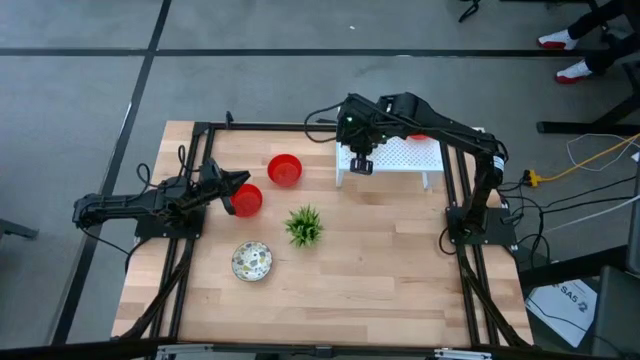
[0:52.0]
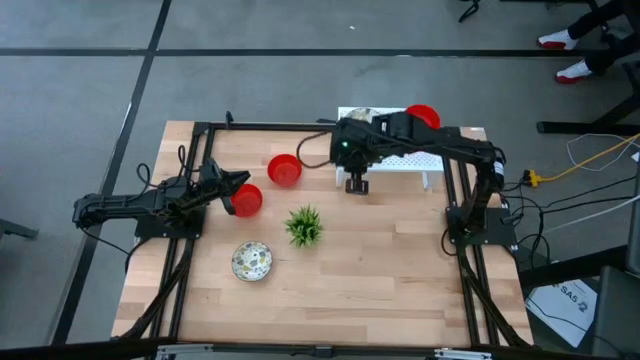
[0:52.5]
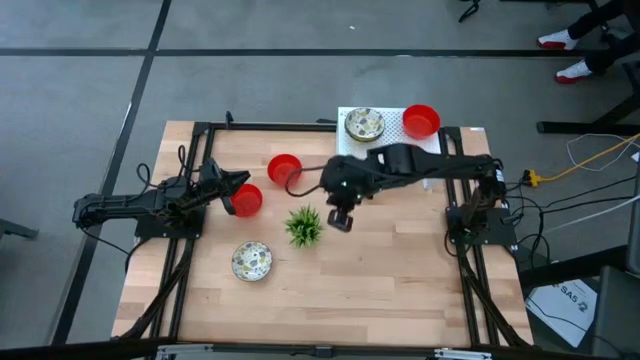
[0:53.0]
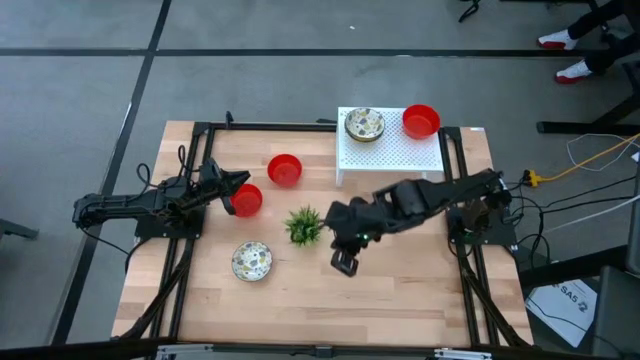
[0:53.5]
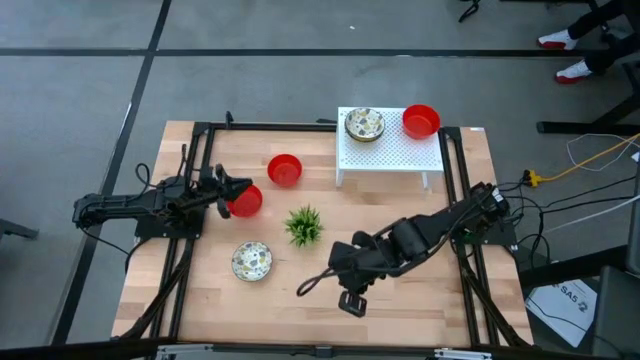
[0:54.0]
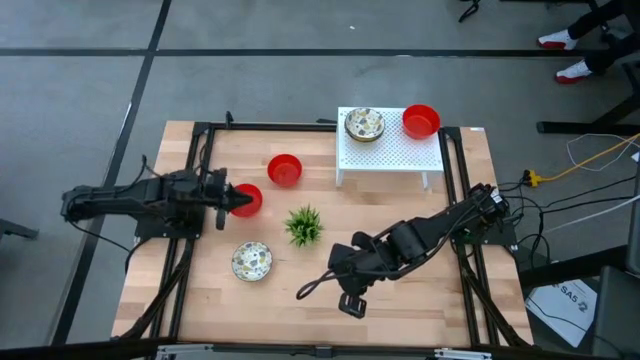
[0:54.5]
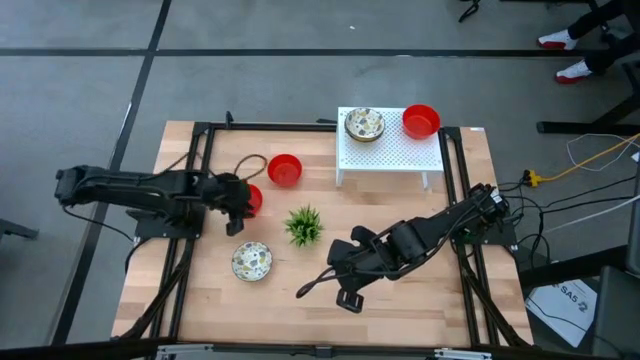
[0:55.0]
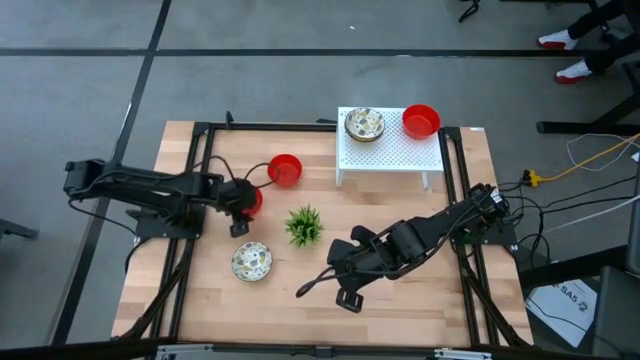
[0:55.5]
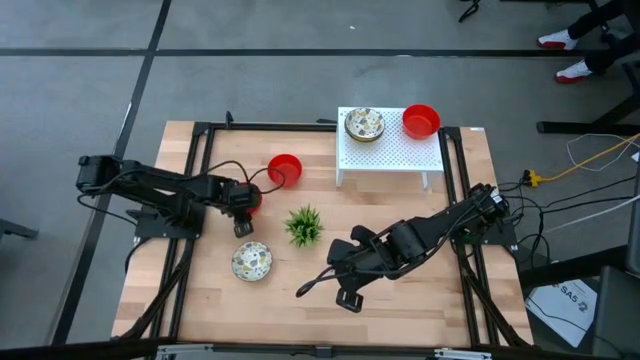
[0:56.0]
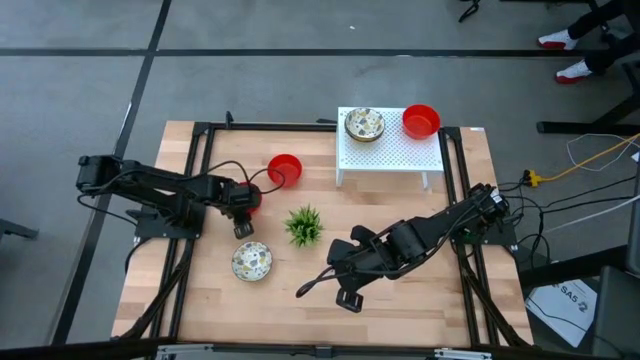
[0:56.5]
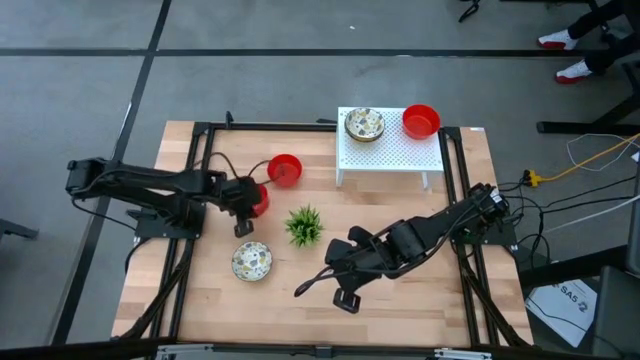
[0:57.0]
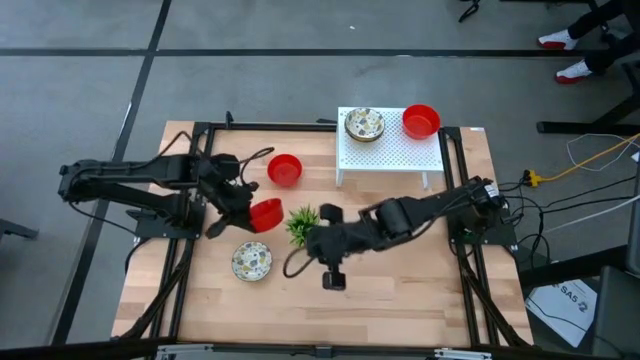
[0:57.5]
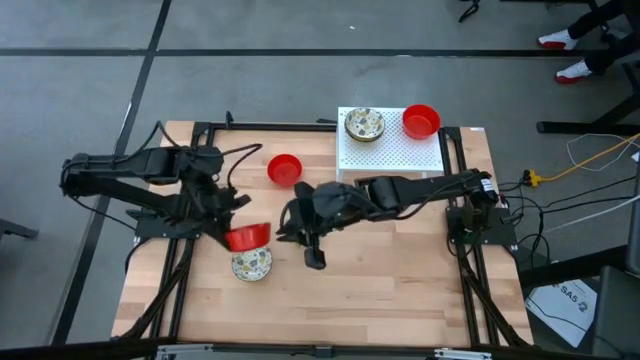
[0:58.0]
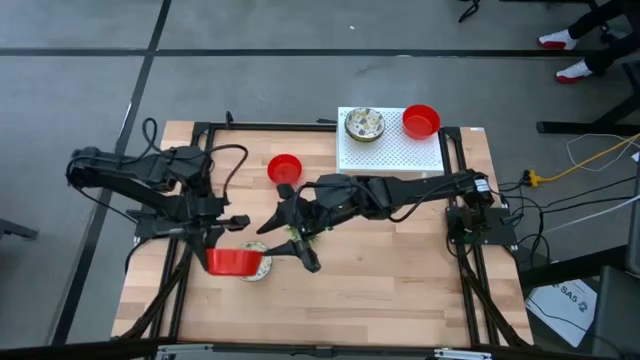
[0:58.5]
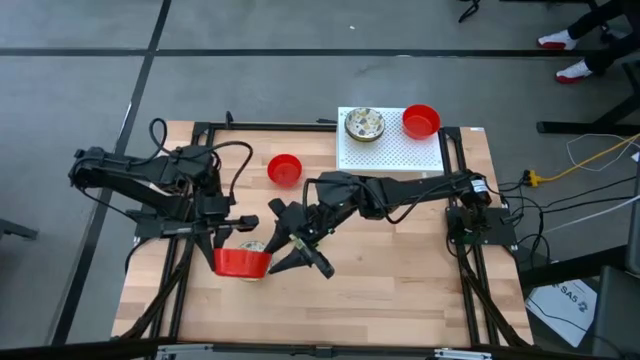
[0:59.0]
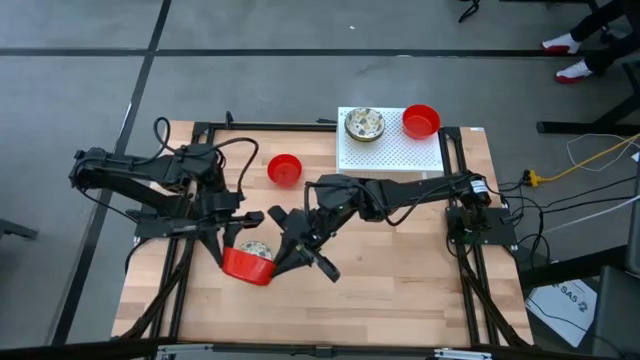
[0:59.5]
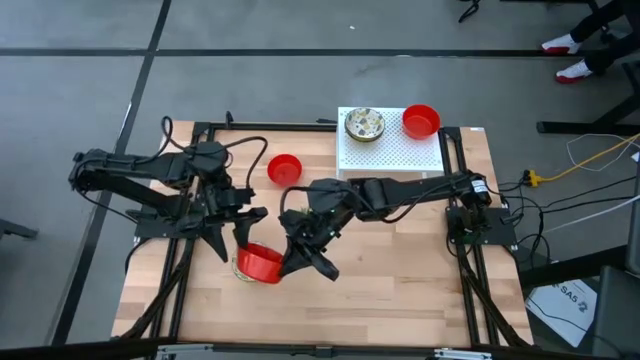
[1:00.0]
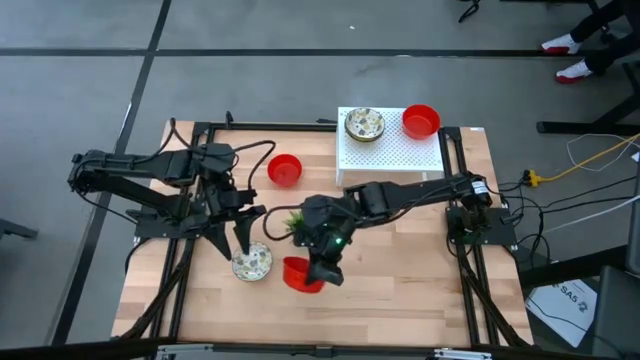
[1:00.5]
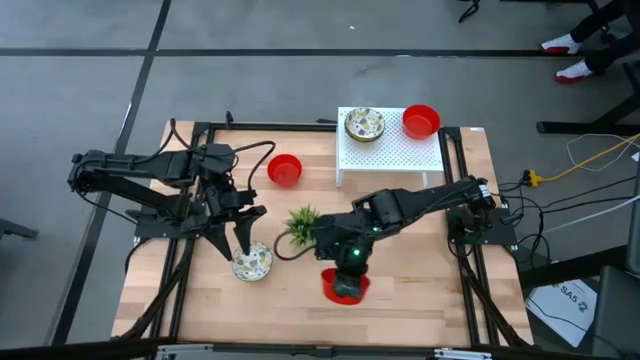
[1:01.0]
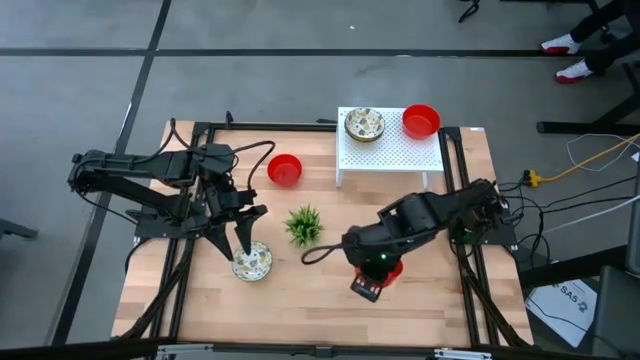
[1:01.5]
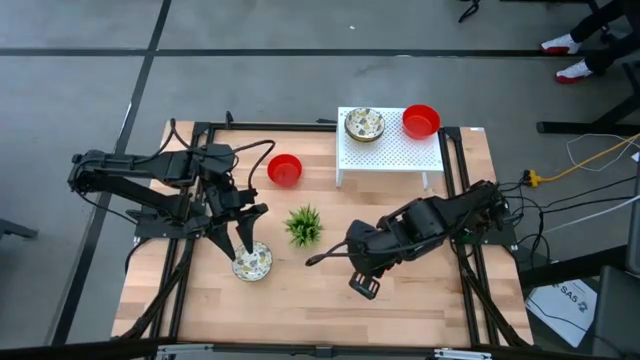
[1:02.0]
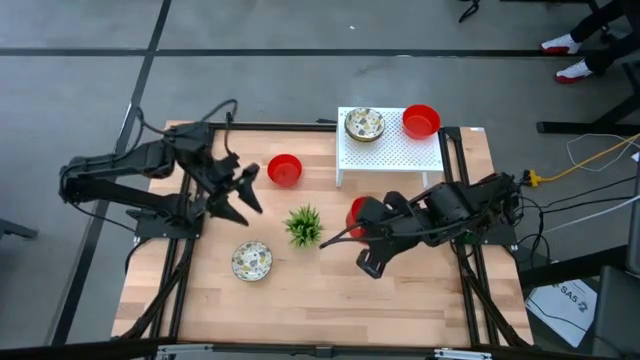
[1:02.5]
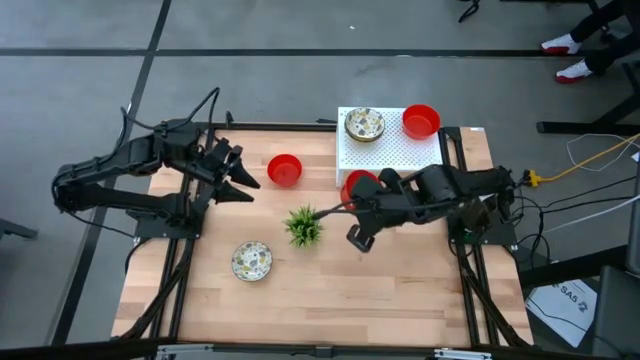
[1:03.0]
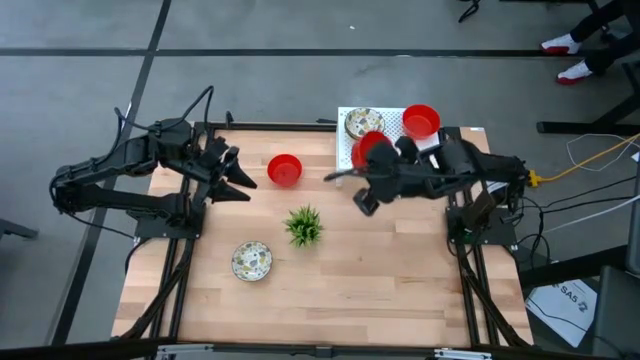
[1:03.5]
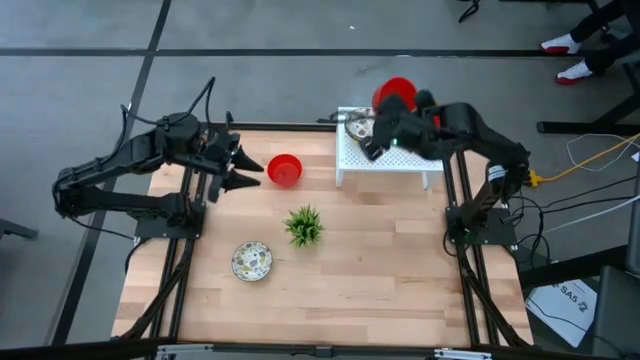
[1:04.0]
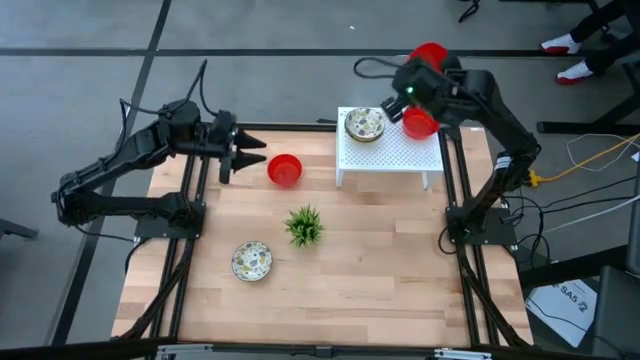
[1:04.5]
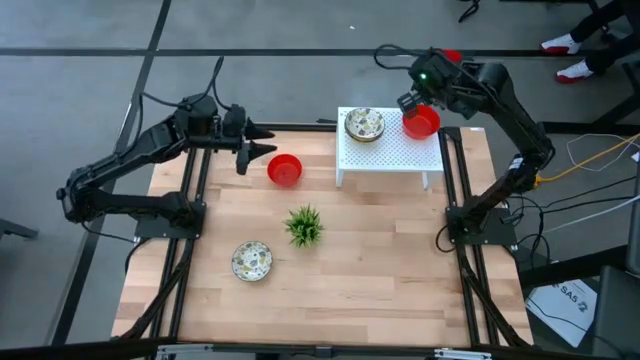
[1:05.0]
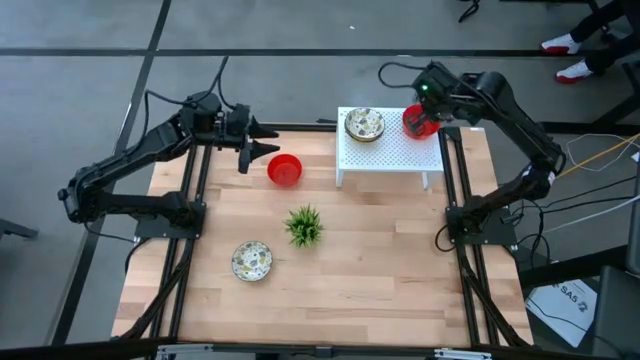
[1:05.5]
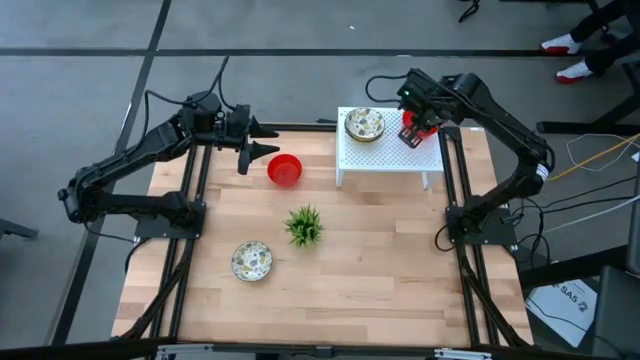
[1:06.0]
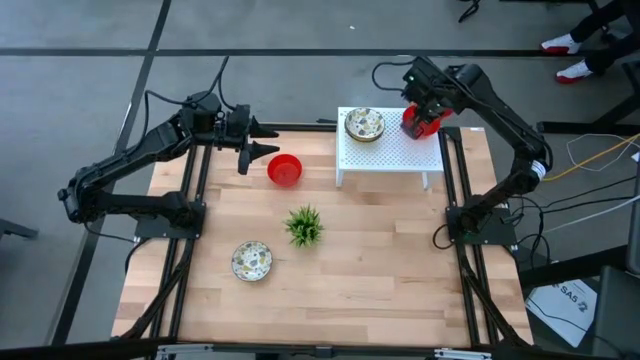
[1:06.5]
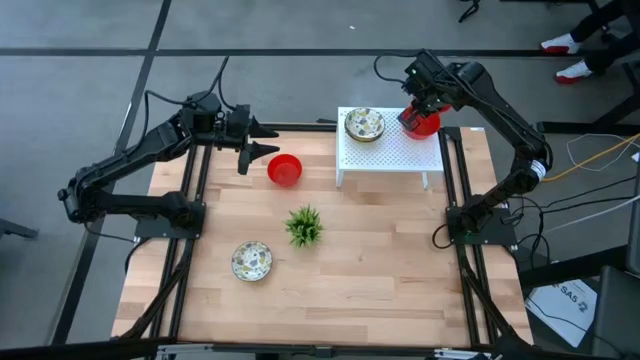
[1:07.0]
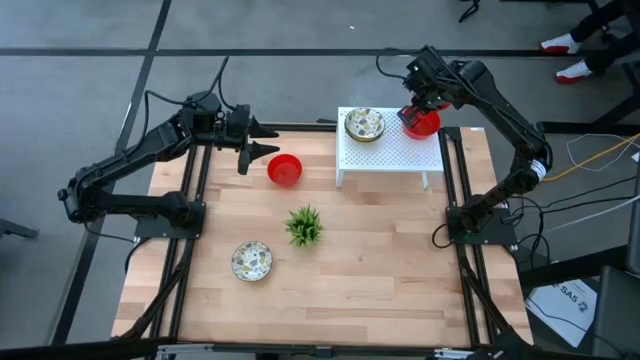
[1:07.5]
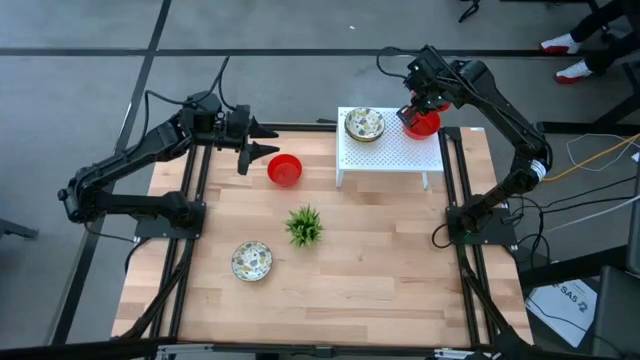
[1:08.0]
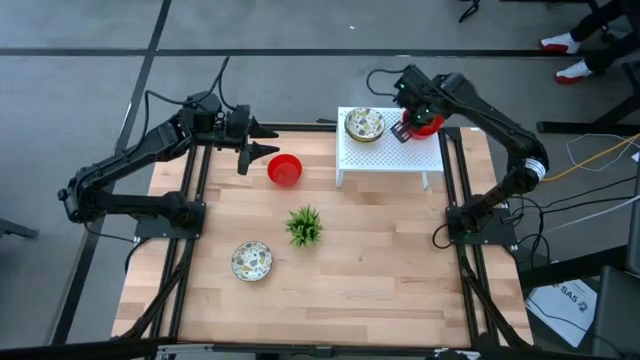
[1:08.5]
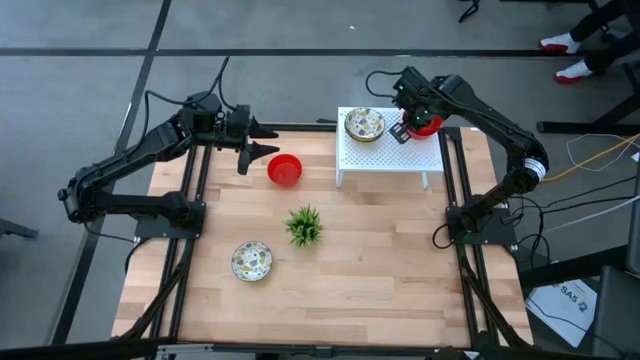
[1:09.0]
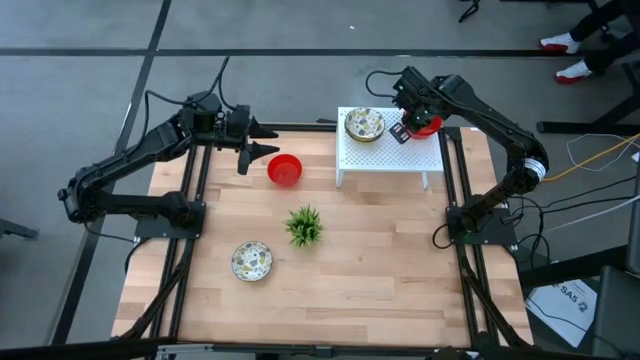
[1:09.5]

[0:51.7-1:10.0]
Task: Pick & Place Mini bowls
Stack the bottom red bowl on the red bowl on the shelf

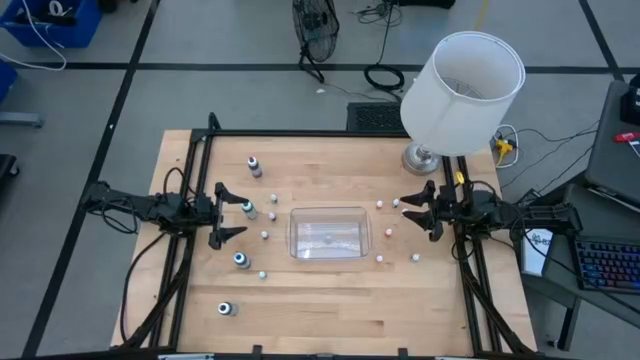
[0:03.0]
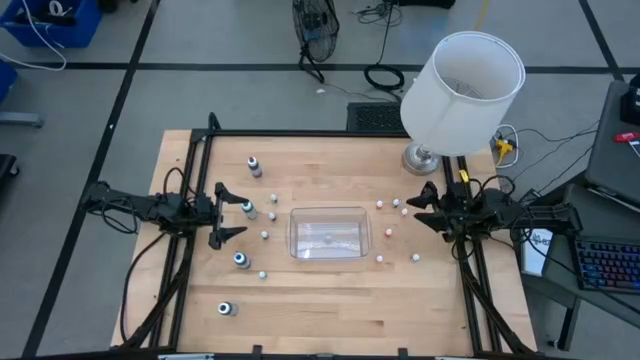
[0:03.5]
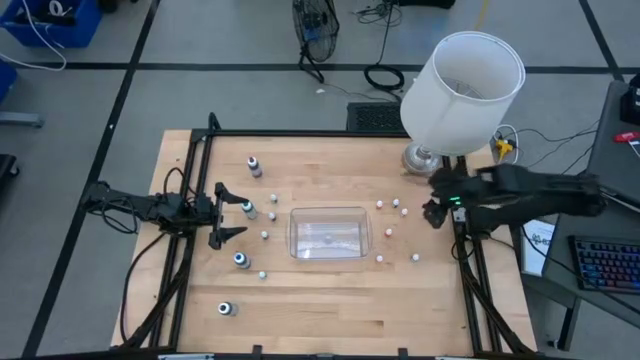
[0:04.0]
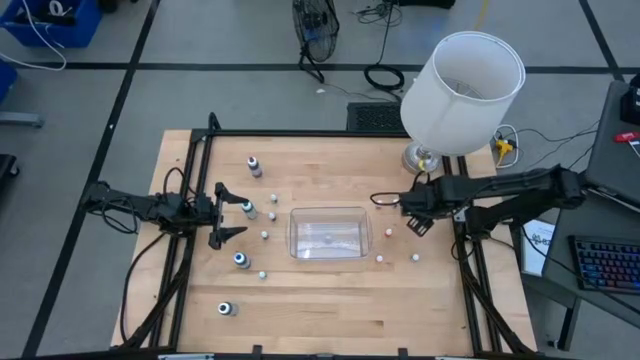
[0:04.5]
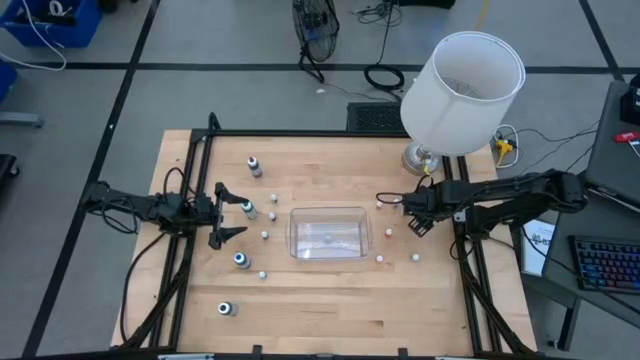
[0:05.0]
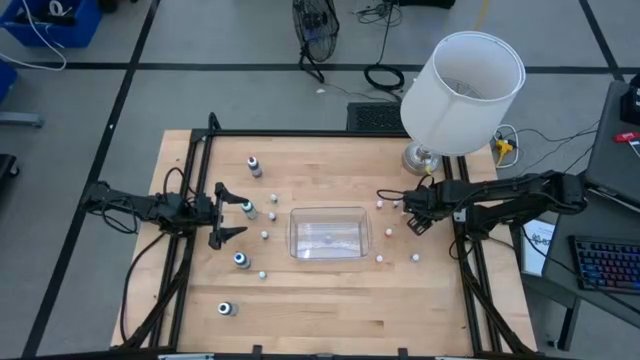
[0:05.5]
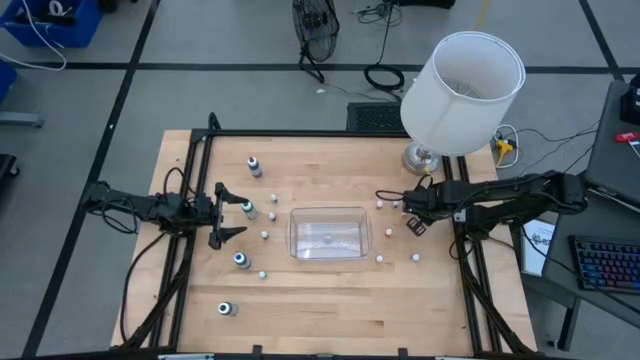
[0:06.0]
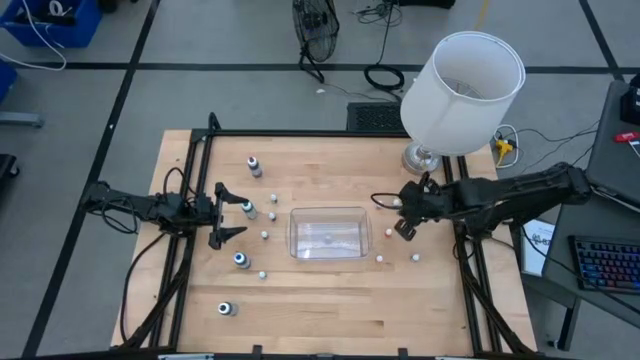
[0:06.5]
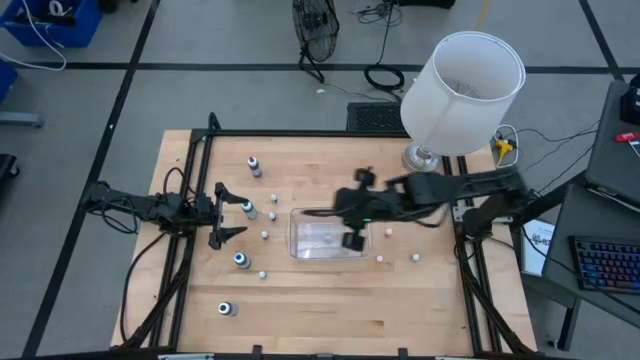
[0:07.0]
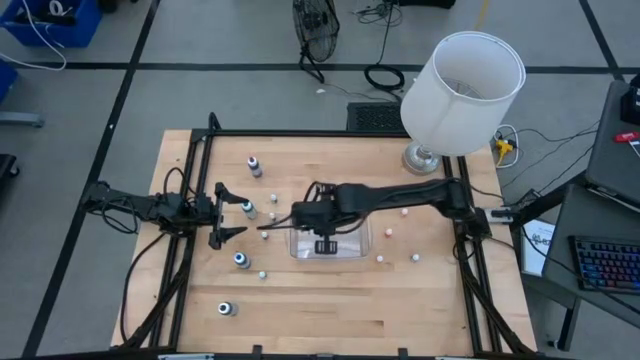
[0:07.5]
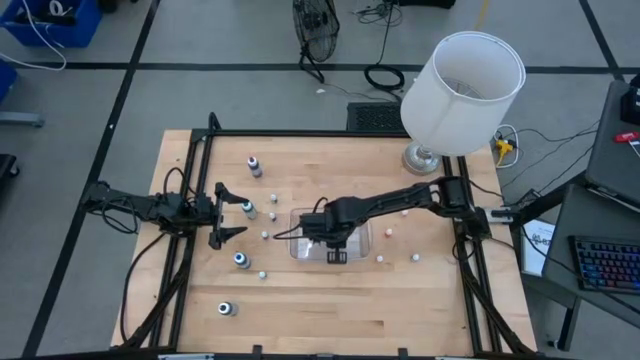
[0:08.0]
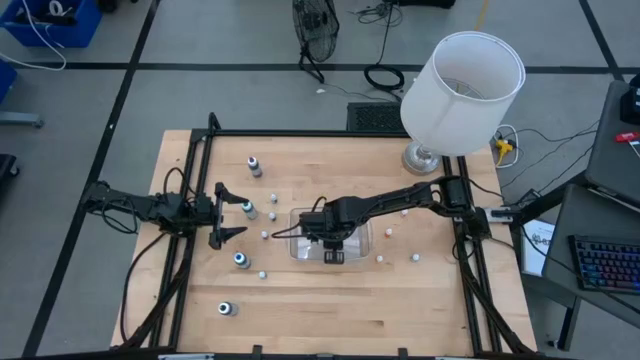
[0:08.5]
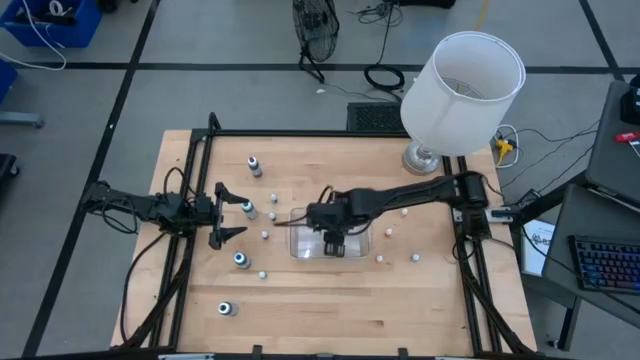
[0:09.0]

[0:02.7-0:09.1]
Task: Pick & Place food coloring
Put the small black food coloring bottle into the transparent bin
